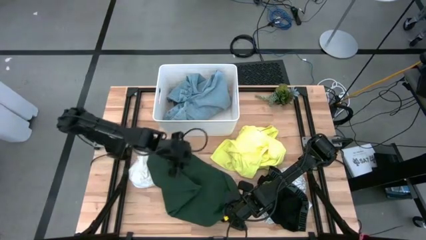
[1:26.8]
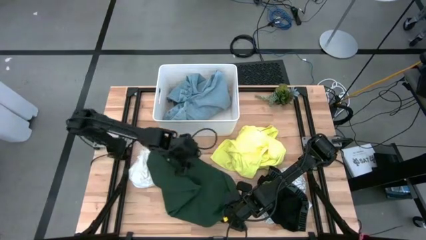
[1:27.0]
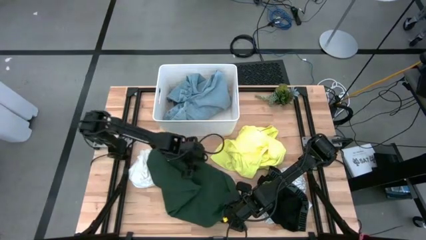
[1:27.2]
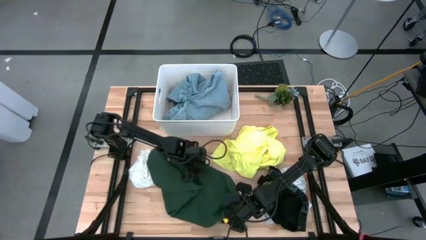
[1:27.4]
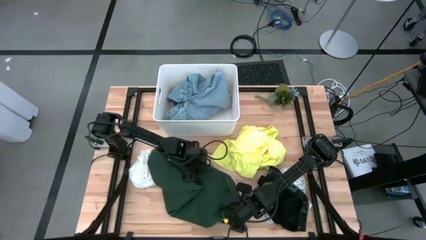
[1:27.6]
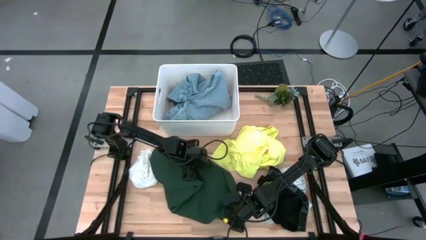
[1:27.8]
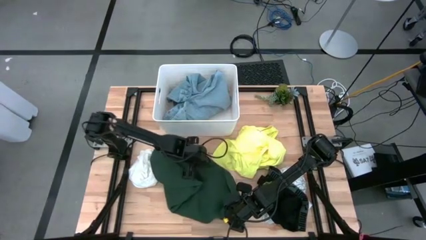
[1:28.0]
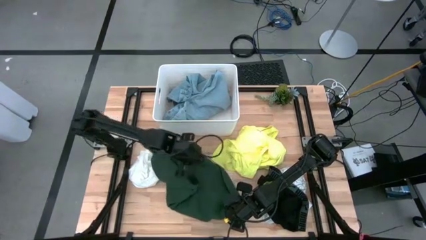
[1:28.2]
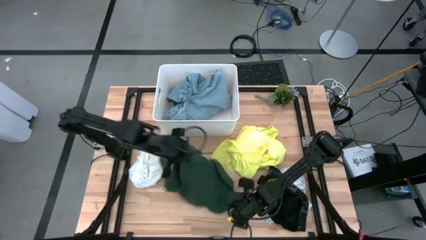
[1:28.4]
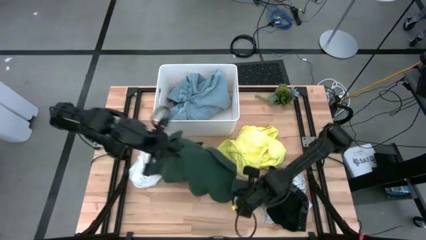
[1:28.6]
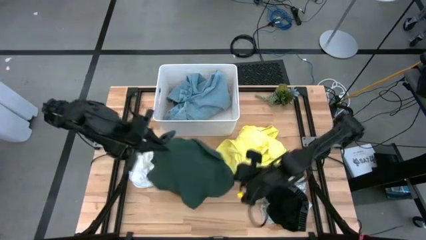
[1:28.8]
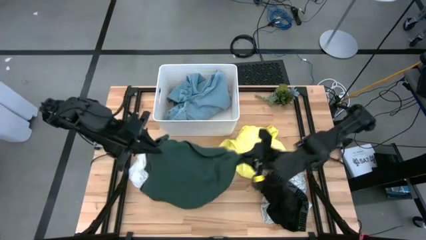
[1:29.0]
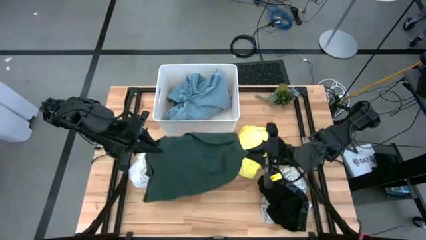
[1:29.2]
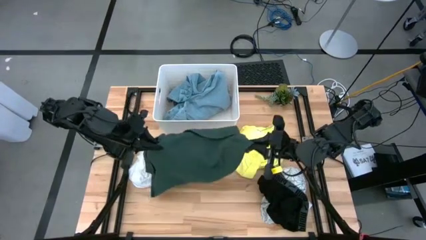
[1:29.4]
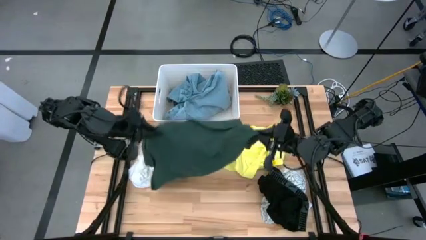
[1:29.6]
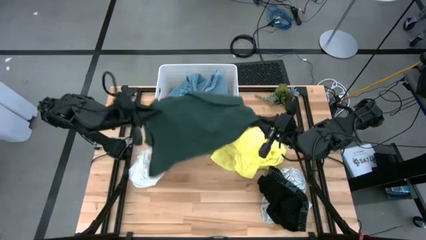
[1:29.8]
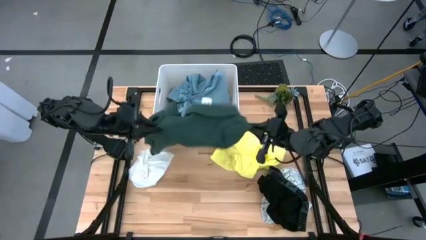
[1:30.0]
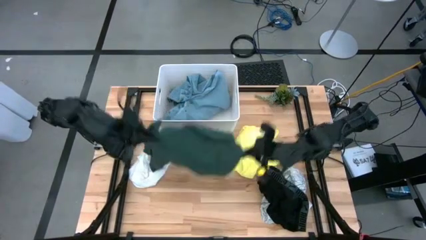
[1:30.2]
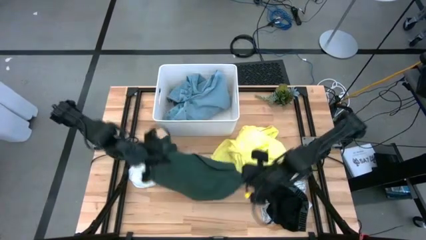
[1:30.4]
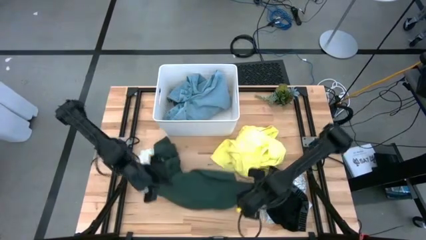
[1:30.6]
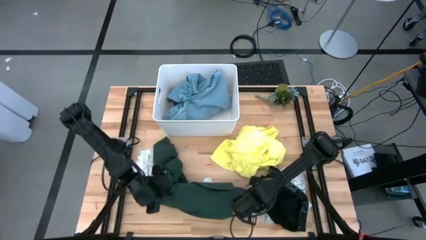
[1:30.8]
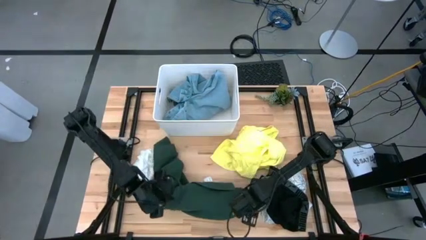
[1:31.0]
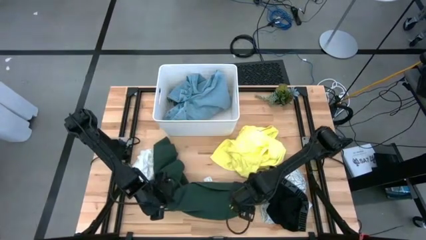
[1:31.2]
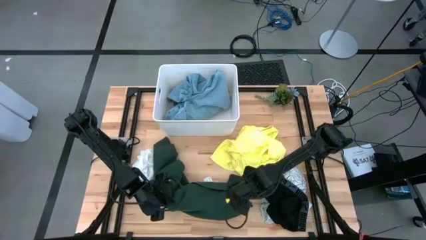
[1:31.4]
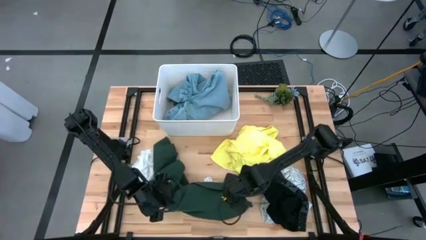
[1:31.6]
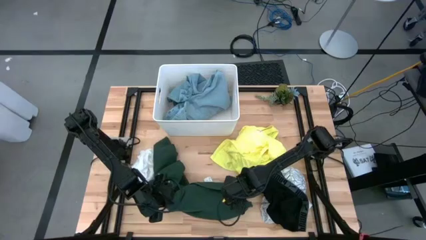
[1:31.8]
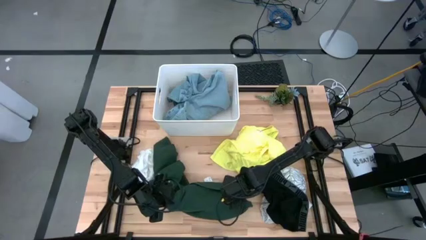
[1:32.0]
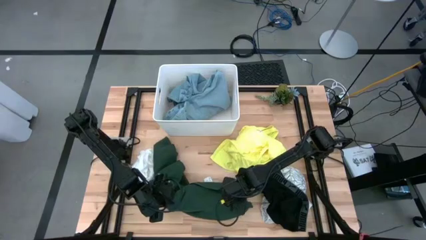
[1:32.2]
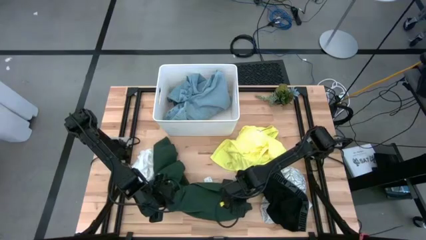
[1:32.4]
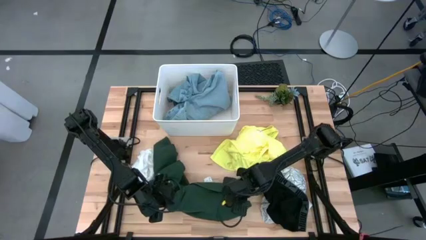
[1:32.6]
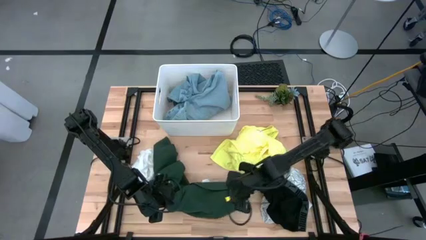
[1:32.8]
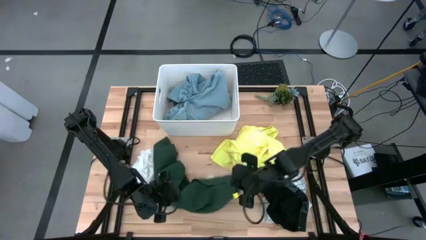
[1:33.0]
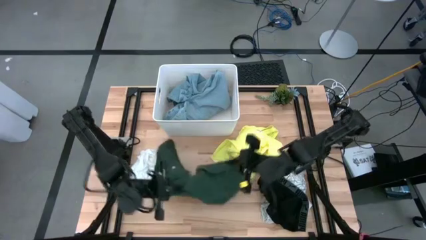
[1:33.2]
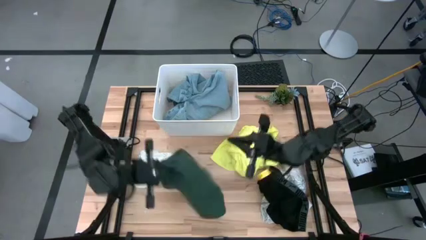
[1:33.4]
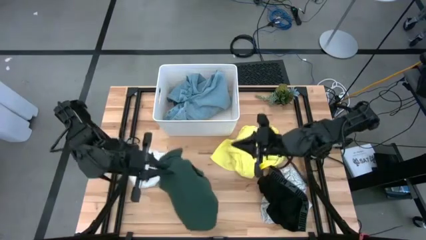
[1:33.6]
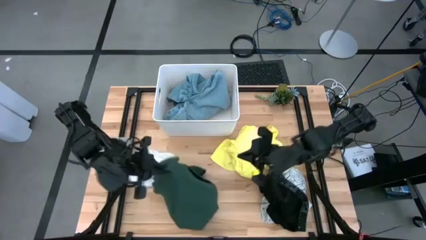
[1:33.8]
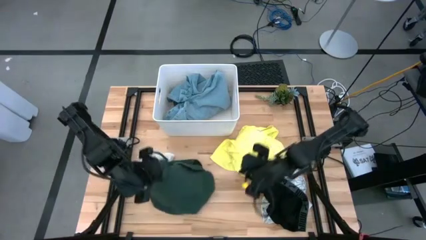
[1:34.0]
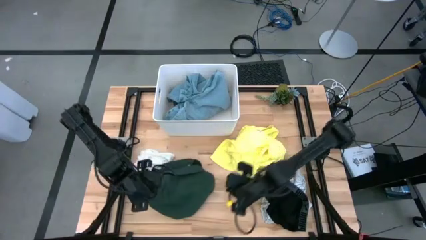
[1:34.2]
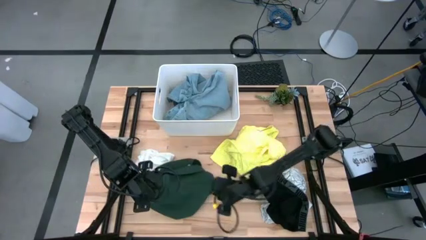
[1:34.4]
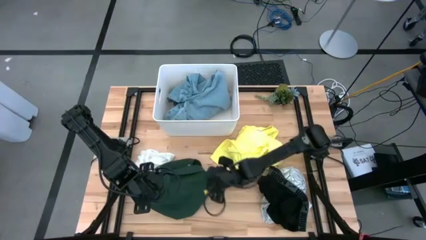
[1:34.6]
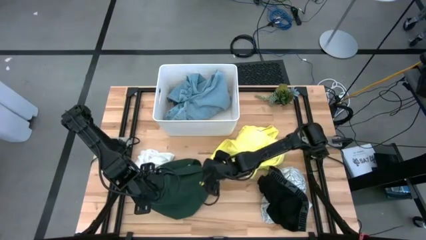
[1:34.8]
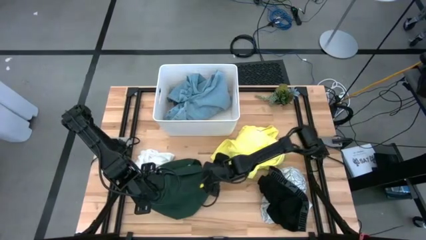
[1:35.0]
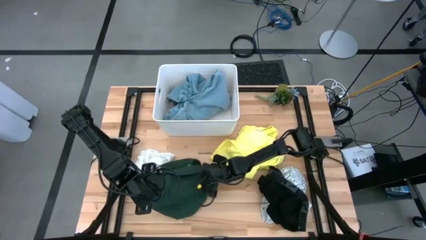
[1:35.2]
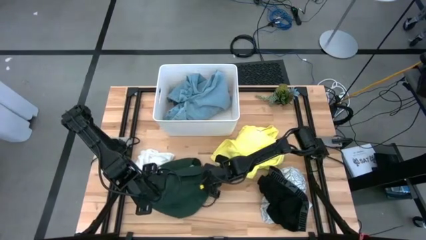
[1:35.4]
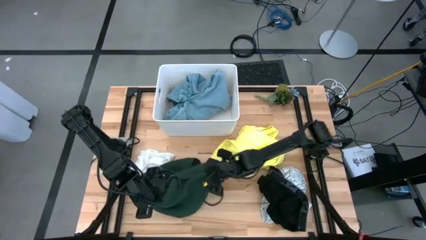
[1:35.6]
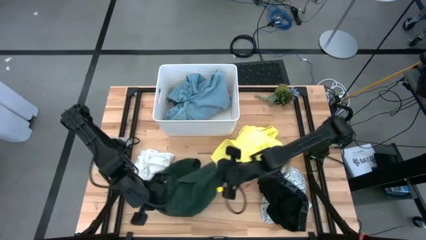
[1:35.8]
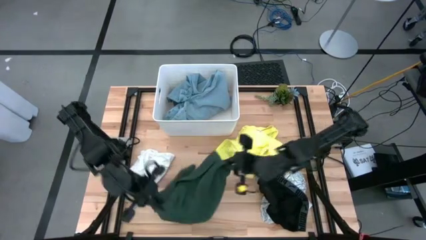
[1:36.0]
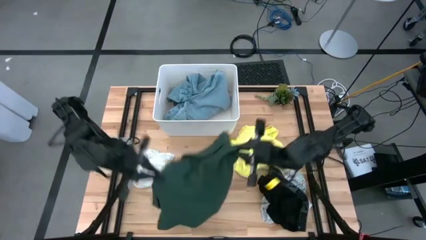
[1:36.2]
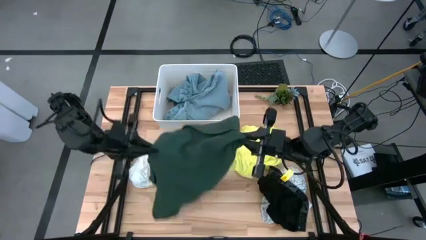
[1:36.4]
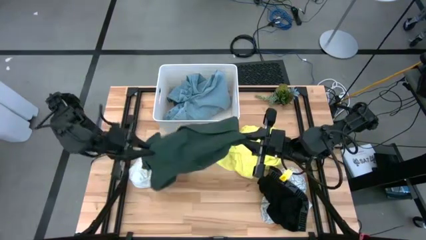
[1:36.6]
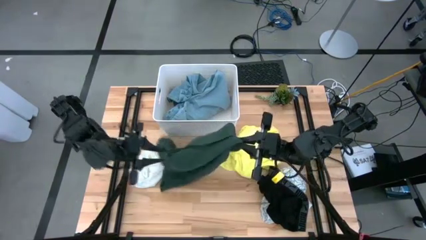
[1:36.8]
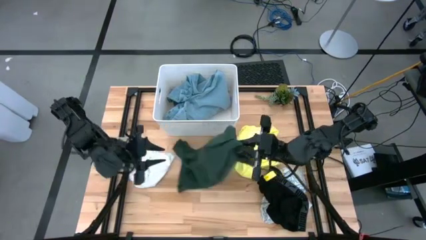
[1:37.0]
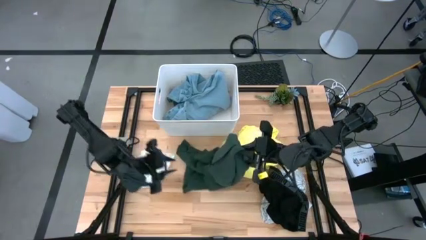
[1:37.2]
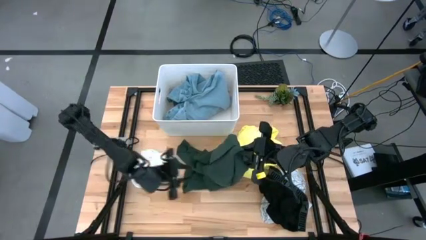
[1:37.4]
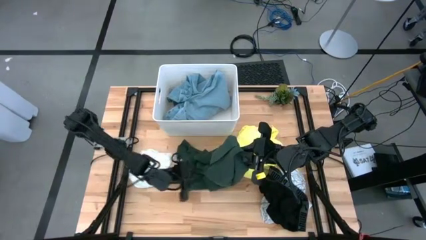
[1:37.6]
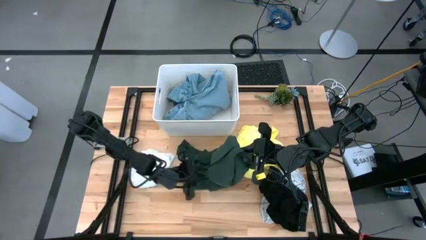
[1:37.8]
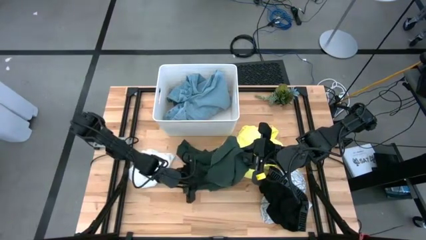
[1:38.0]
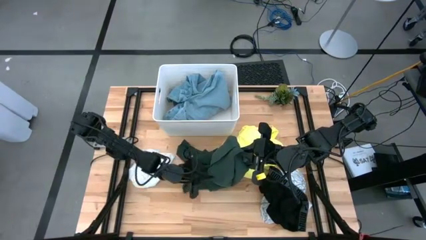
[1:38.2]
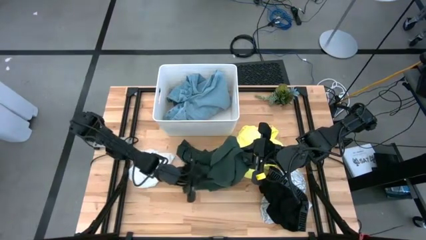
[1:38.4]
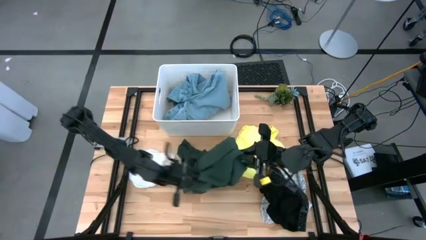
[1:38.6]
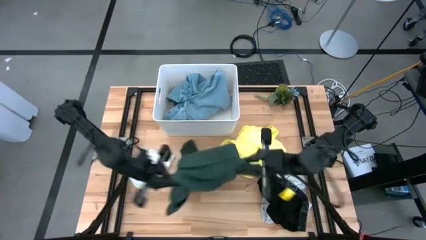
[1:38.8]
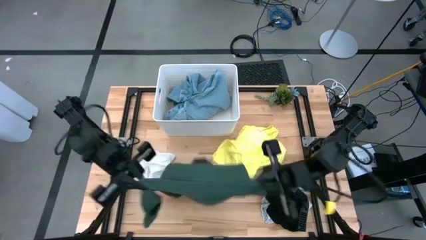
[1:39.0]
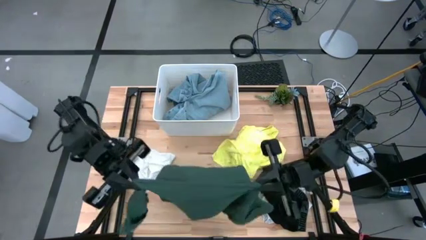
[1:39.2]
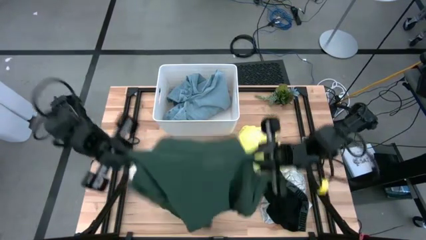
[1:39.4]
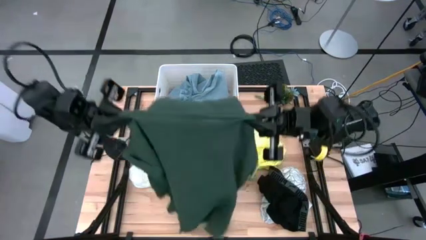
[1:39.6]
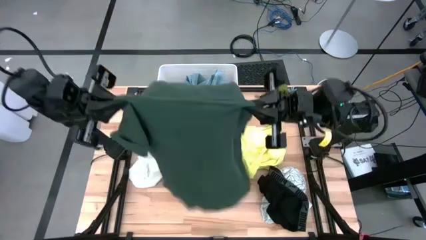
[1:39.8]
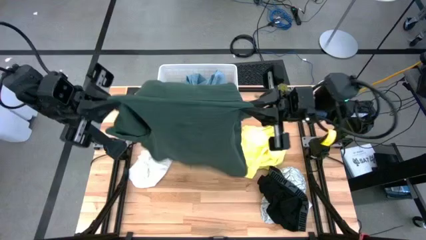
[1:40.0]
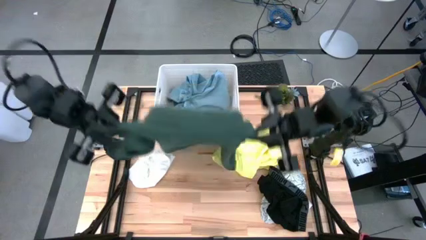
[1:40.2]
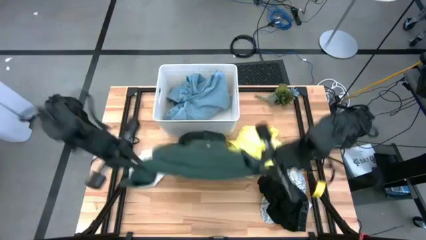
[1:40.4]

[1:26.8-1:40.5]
Task: Fold laundry
Fold the green shirt

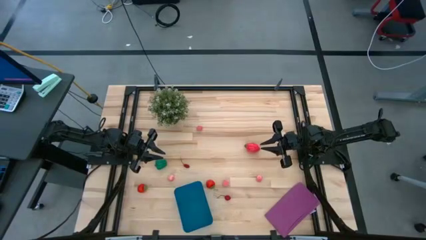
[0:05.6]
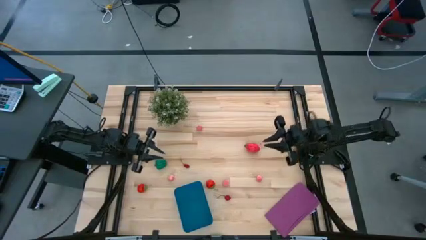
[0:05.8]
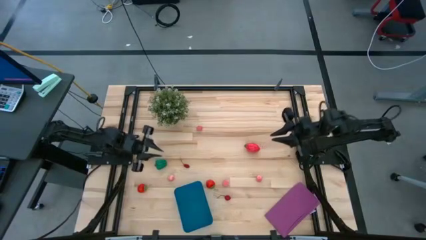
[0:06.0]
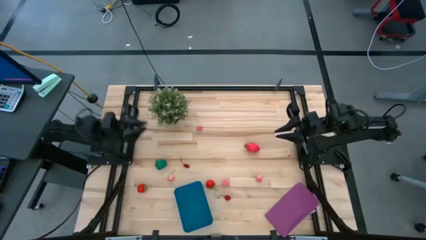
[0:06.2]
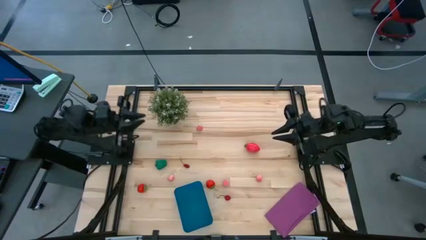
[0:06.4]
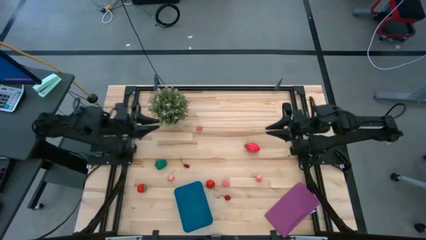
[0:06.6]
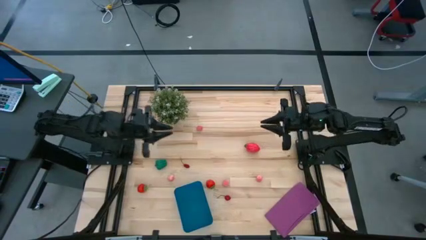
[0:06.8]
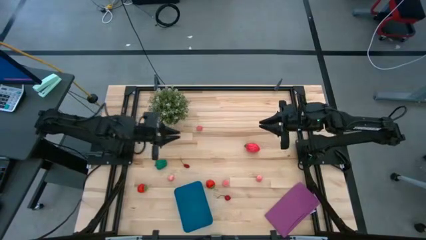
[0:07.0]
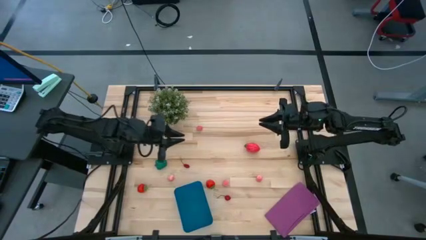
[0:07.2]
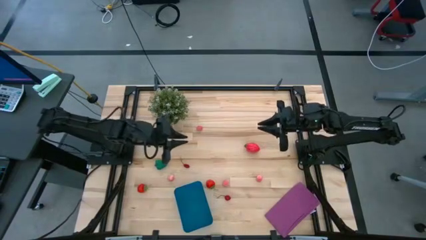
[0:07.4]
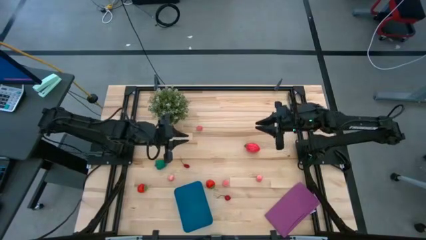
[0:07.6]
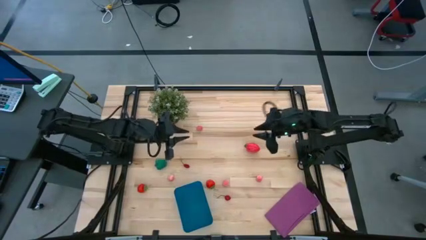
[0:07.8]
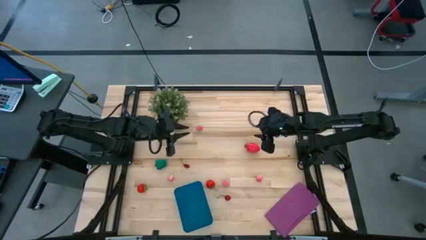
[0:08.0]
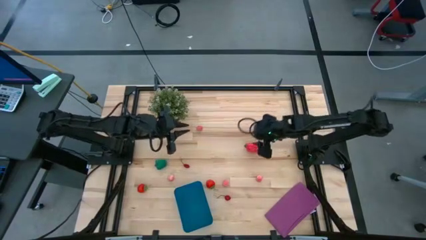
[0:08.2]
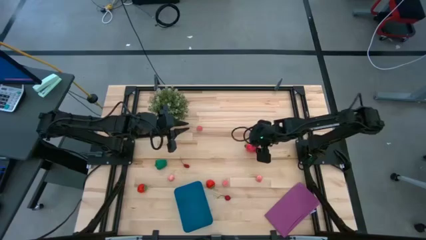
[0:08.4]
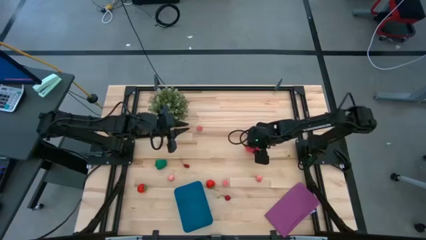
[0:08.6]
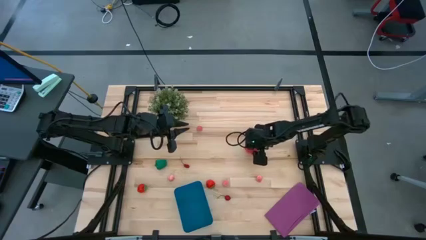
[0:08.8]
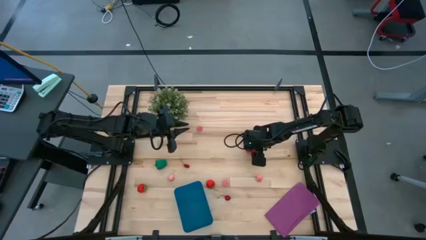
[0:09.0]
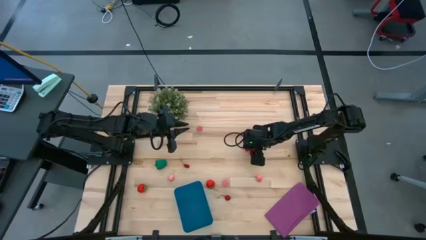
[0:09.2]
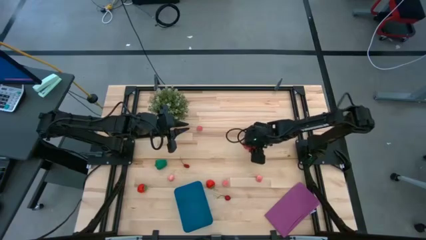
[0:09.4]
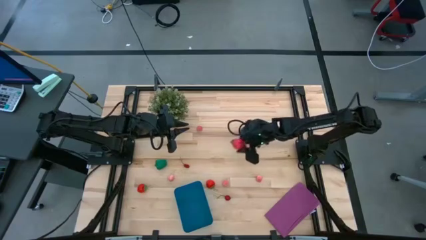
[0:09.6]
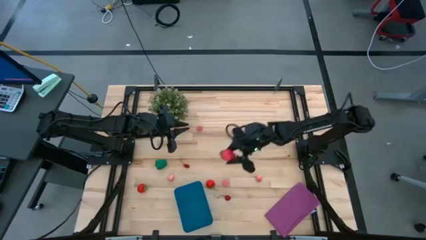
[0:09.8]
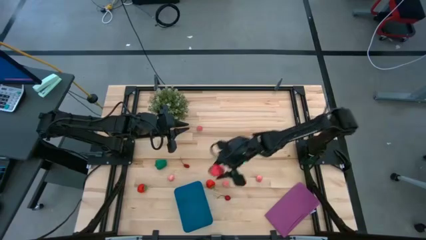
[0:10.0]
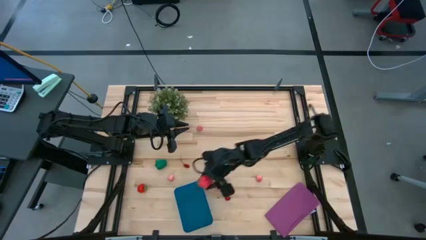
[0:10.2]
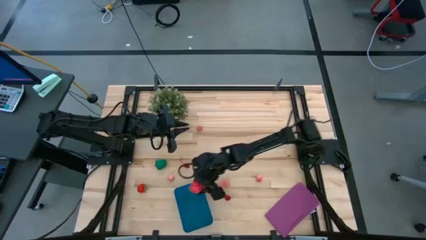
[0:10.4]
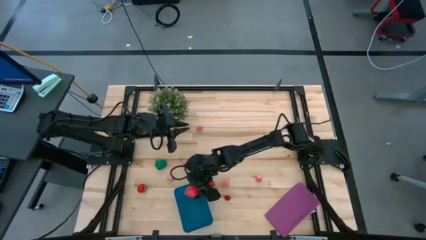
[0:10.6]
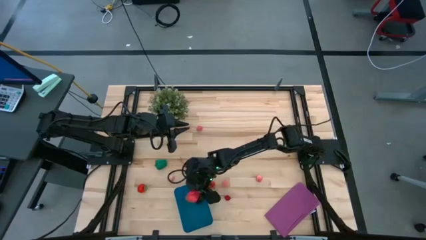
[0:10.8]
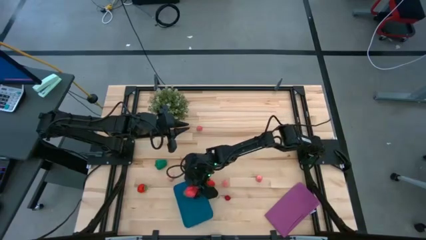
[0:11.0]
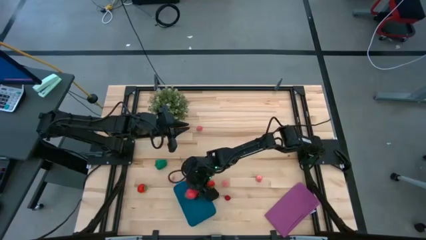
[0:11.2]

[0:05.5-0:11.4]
Task: Pick and placing Produce into tupperware
Put the red dragon fruit into the blue bin
